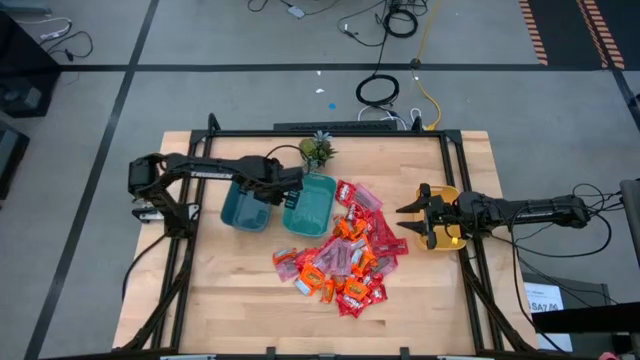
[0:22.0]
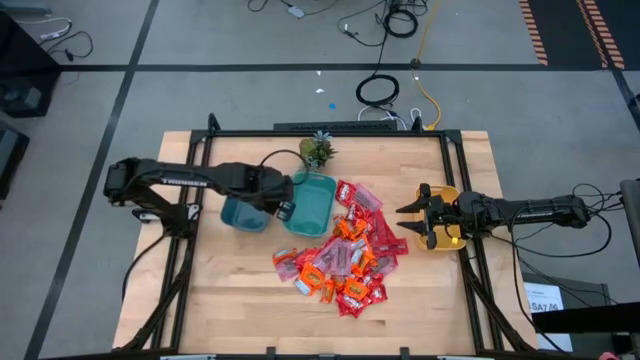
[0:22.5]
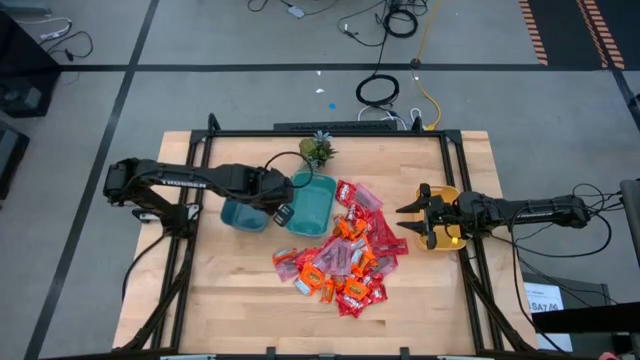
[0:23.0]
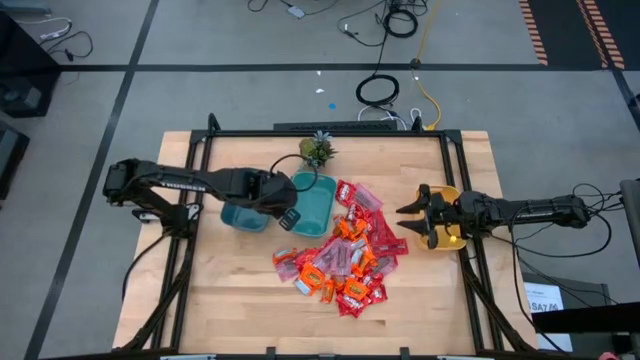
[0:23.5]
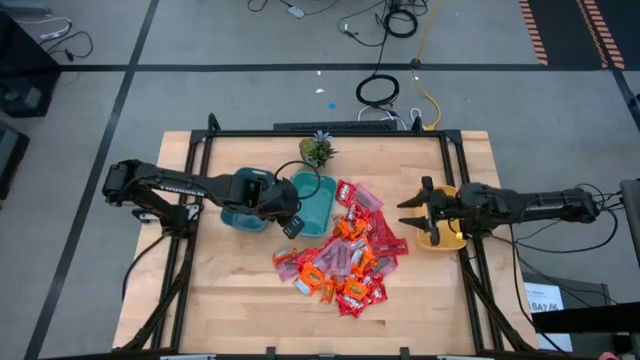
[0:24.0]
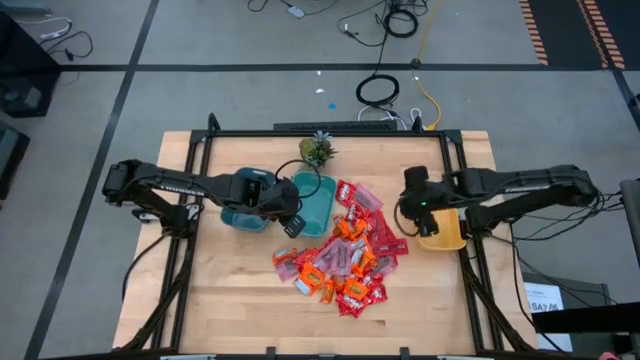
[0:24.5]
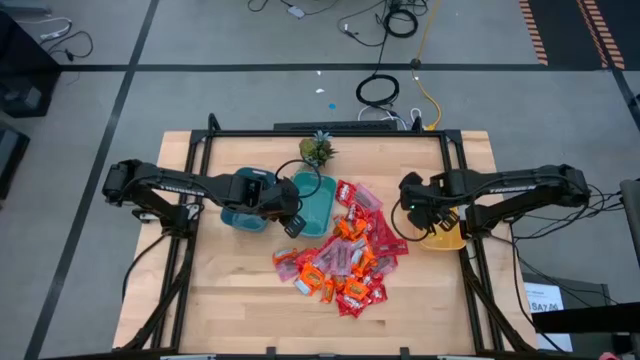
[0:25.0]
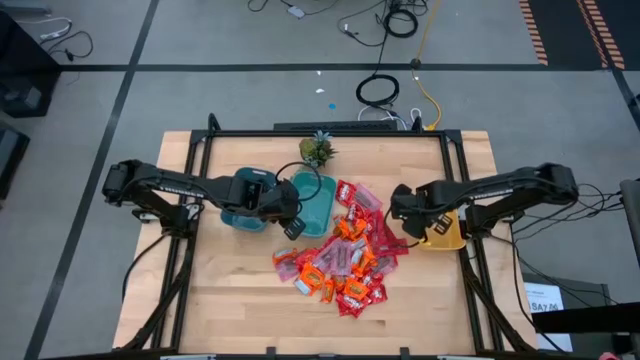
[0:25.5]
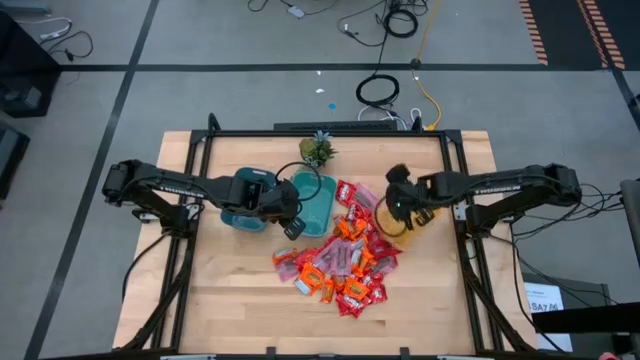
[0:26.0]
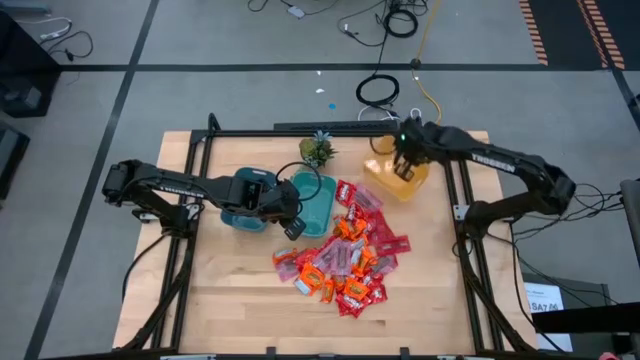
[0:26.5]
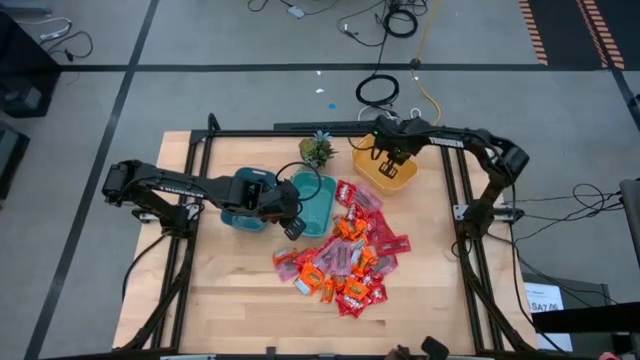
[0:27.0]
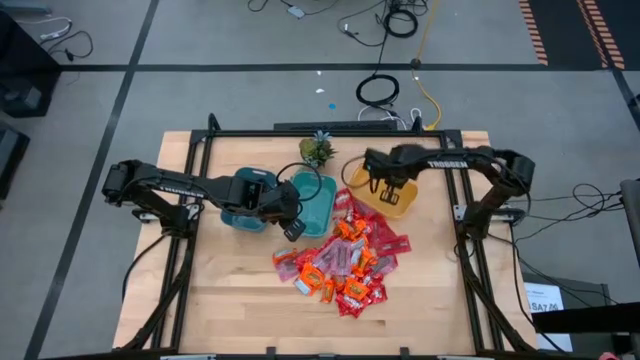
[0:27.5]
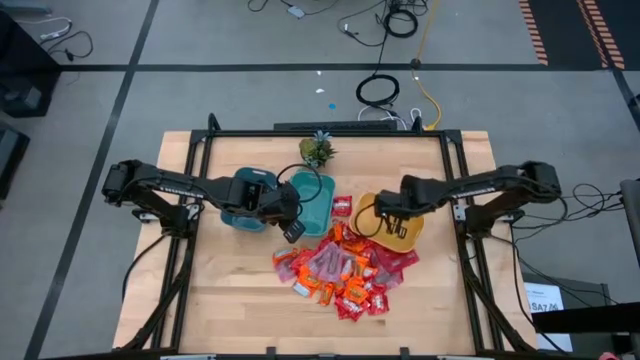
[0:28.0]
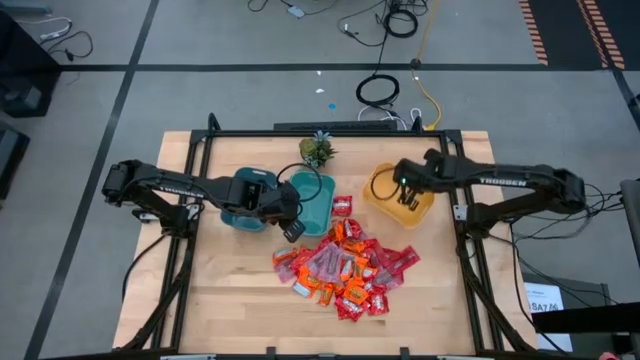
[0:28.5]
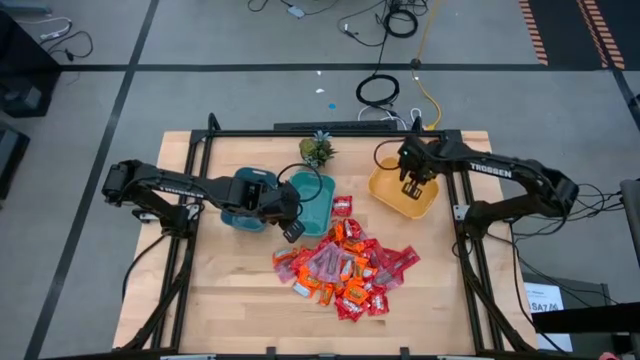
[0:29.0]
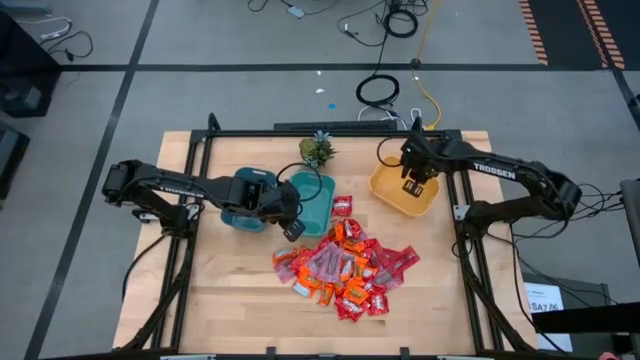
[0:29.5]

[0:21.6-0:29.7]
Task: Sort candy
Move the yellow bin from the middle right to the top right of the table

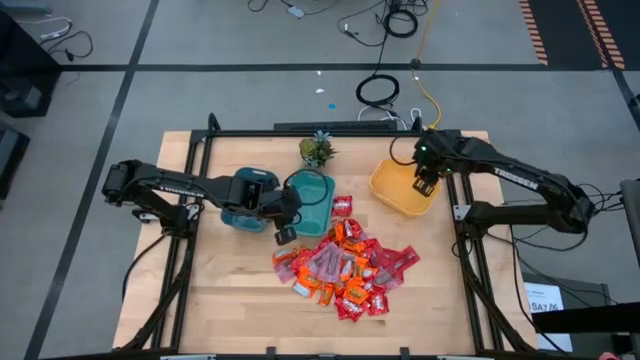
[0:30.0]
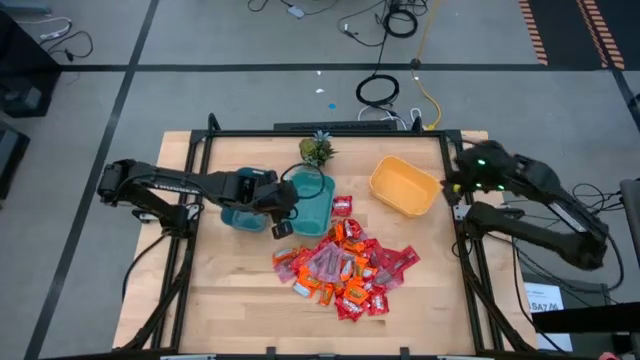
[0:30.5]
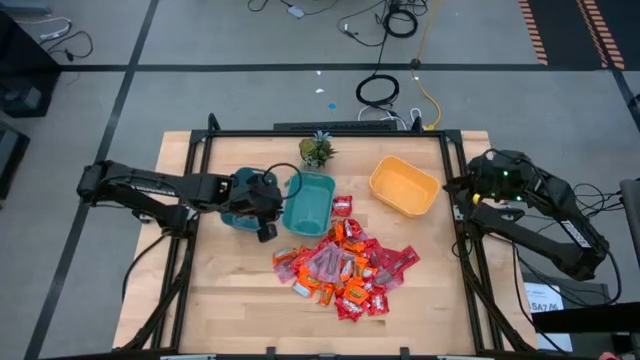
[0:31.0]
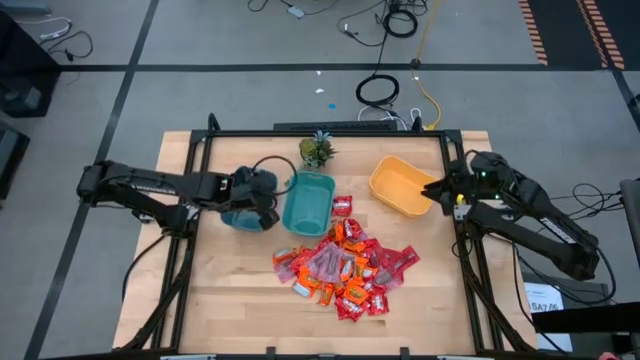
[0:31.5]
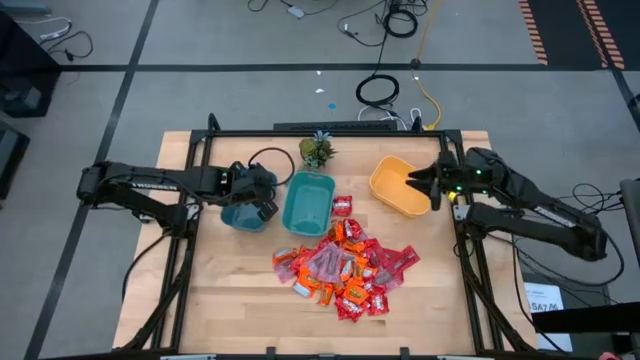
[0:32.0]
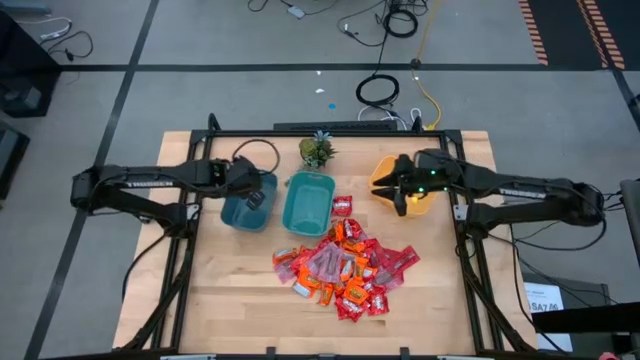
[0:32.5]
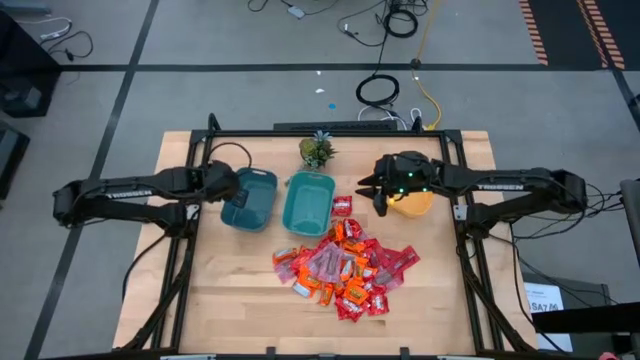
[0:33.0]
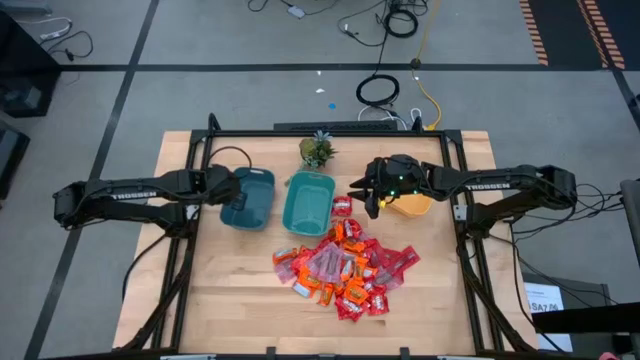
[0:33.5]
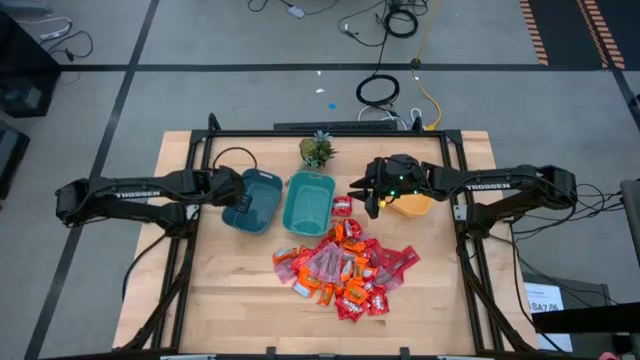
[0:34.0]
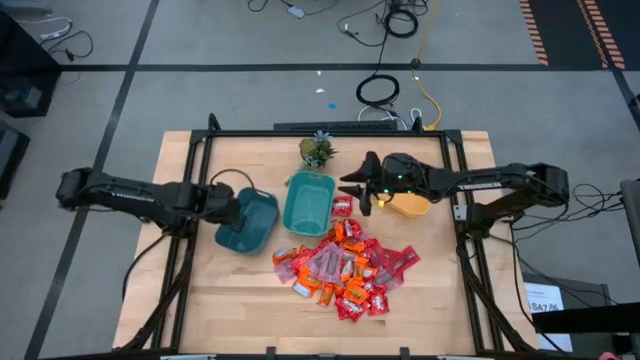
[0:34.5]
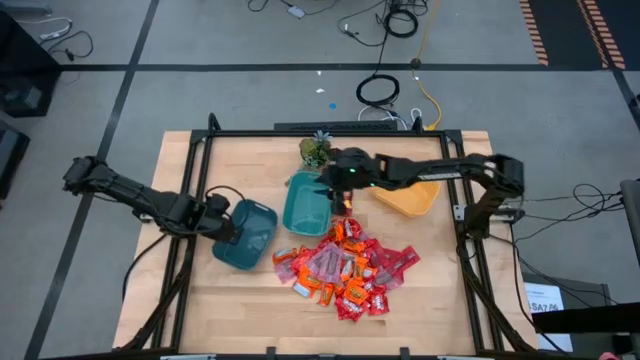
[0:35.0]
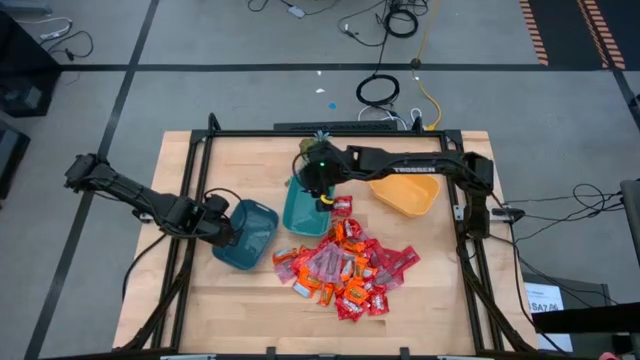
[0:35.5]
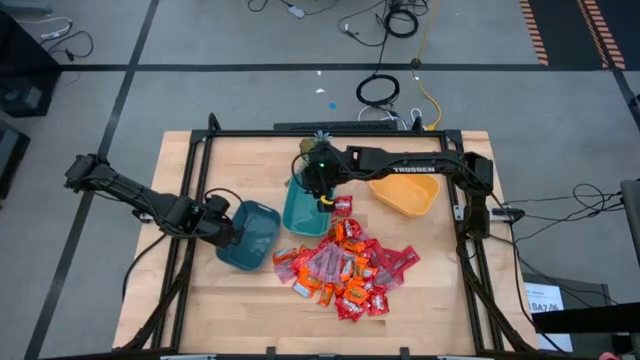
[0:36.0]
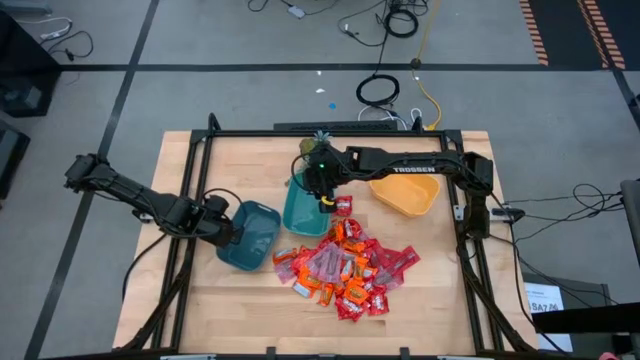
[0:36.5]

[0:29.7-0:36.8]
Adjust the blue bin

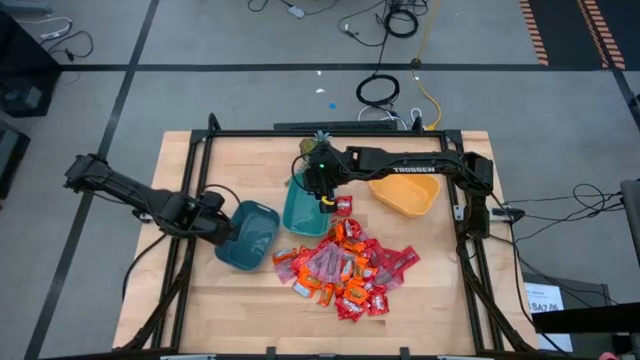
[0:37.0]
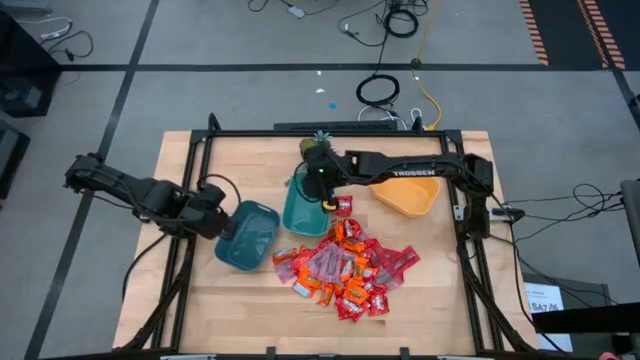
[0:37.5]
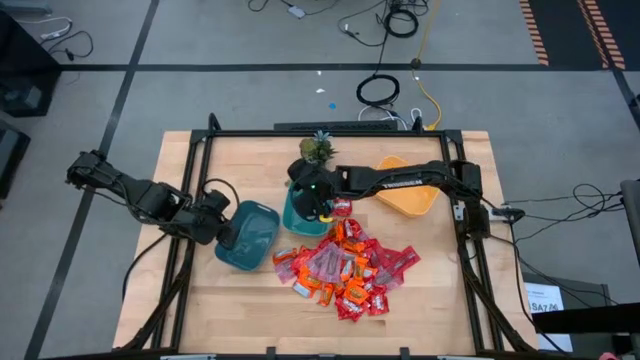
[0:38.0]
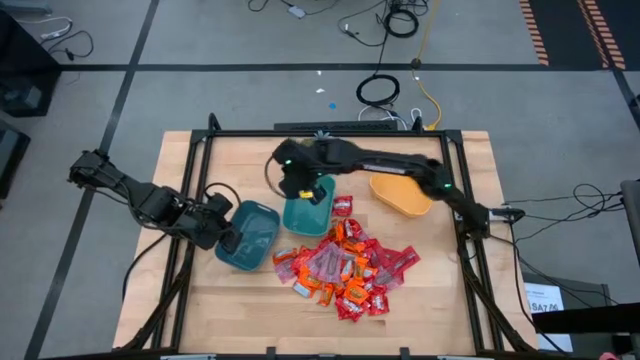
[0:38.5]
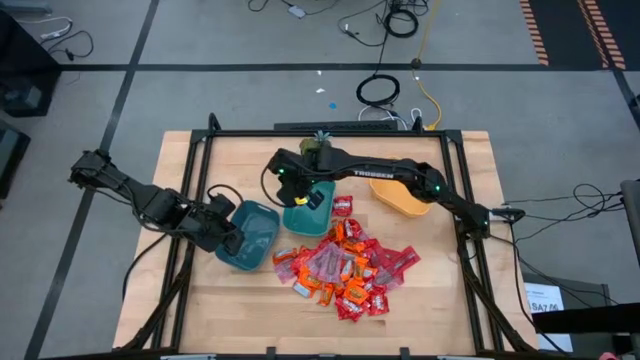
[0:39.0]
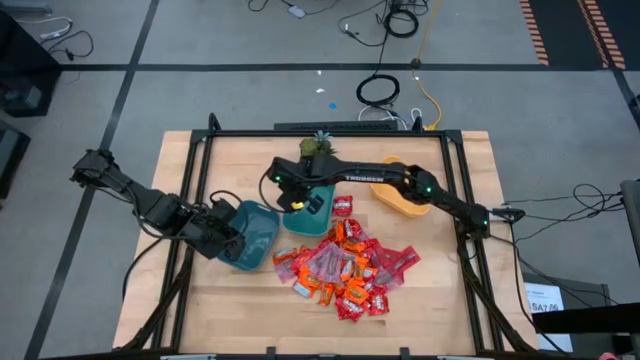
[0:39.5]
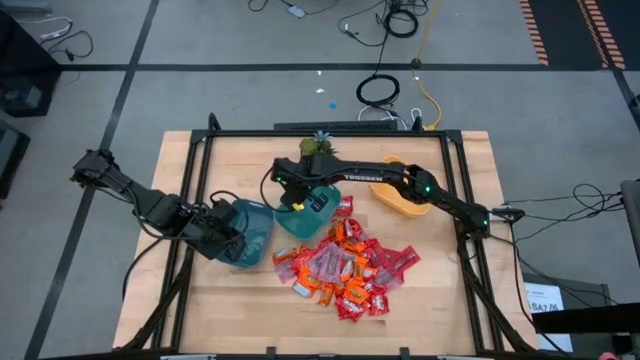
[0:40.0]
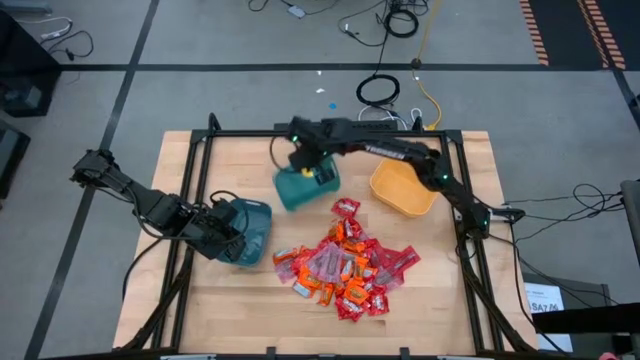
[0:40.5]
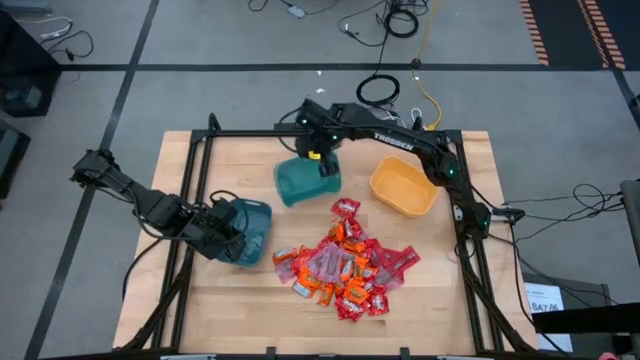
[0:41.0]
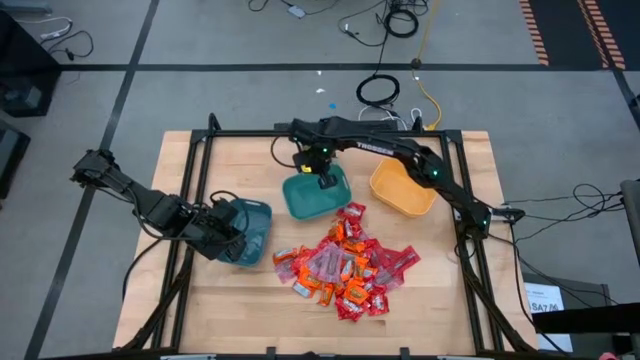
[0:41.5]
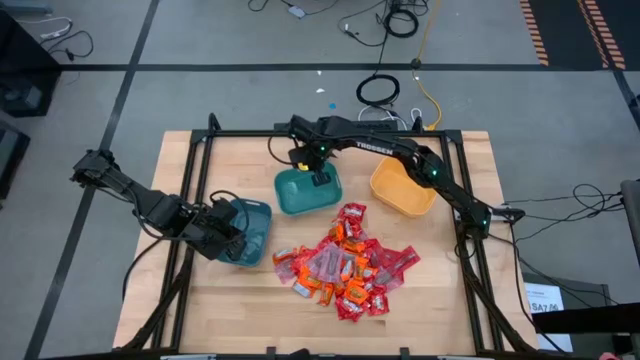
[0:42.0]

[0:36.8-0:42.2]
Adjust the light blue bin

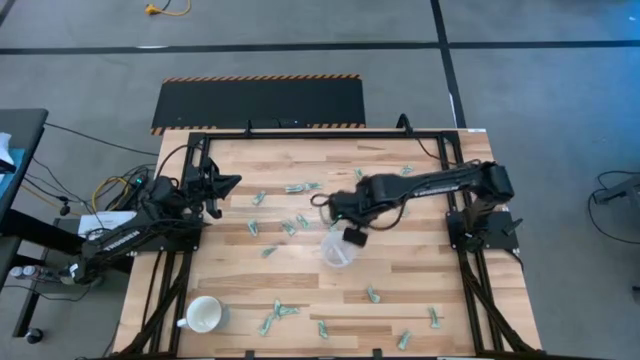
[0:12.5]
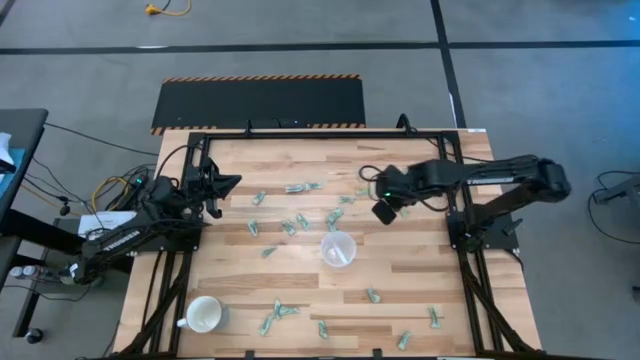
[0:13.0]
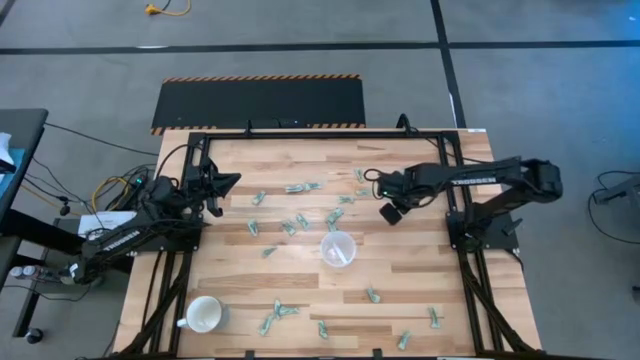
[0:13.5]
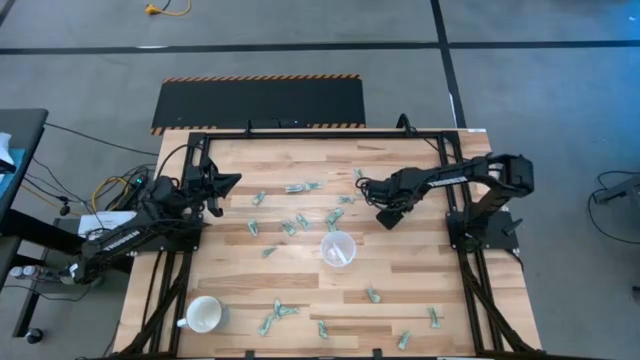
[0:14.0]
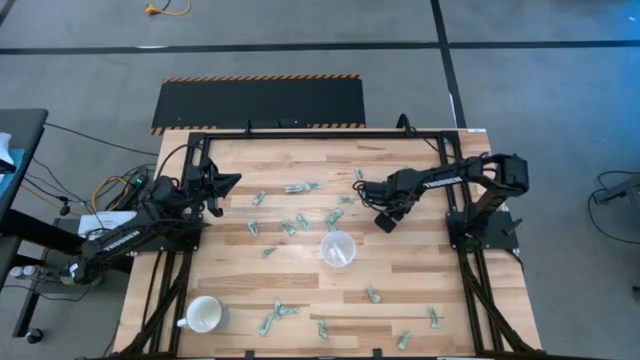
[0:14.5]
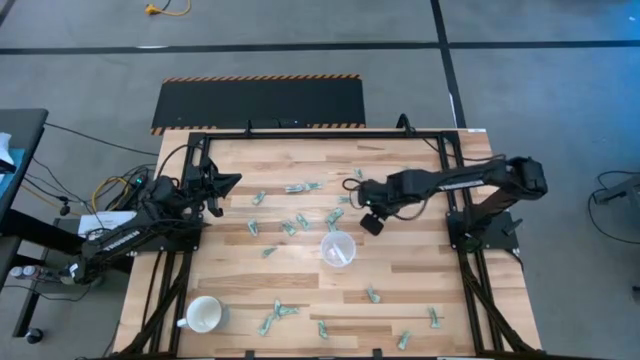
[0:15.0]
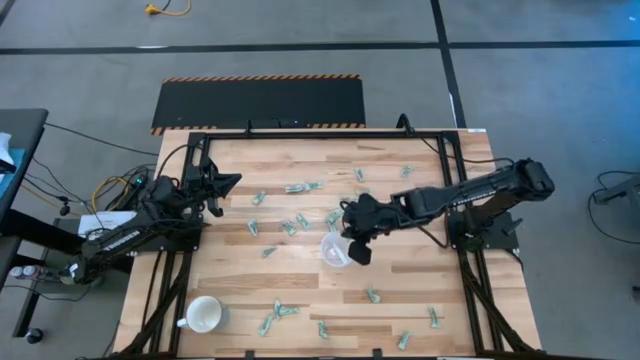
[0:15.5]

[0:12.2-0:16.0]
Task: Pick and place Stevia / Truvia into bins
Put the stevia packet into the transparent container
